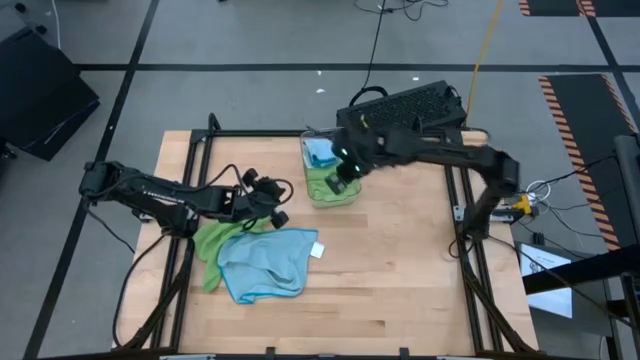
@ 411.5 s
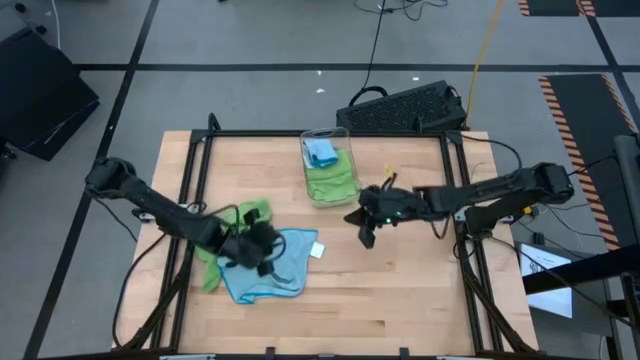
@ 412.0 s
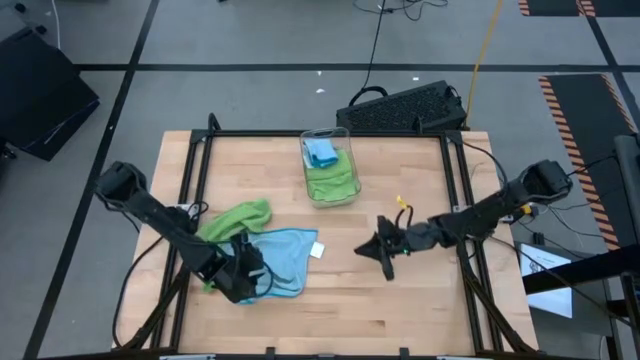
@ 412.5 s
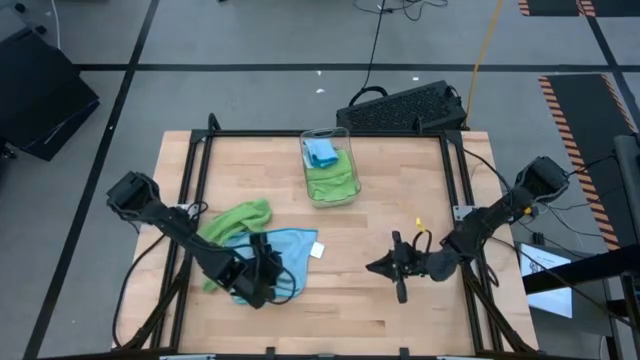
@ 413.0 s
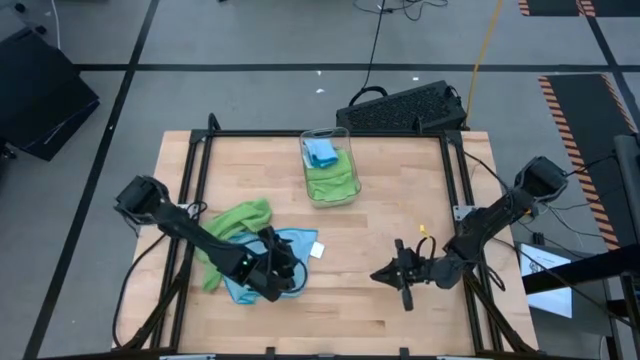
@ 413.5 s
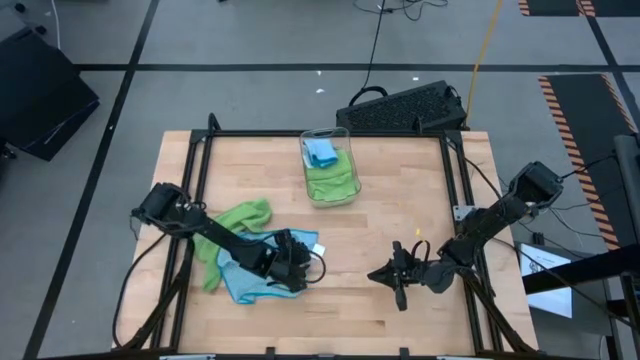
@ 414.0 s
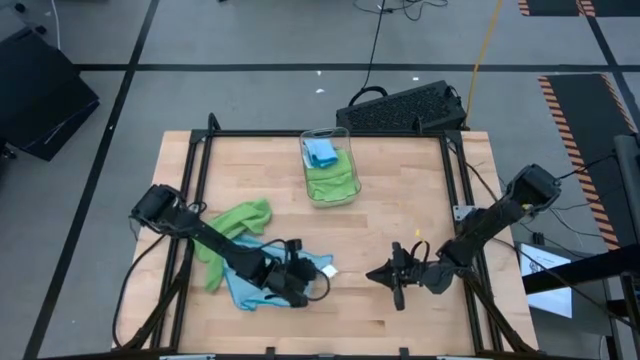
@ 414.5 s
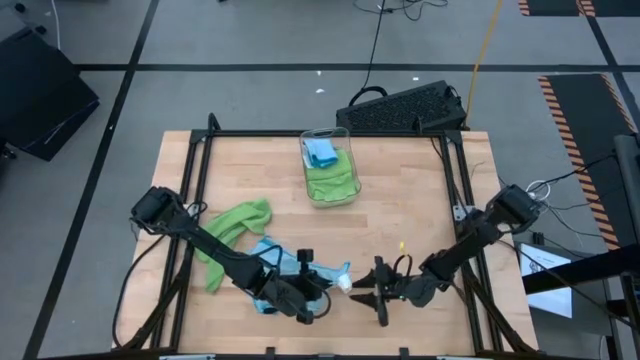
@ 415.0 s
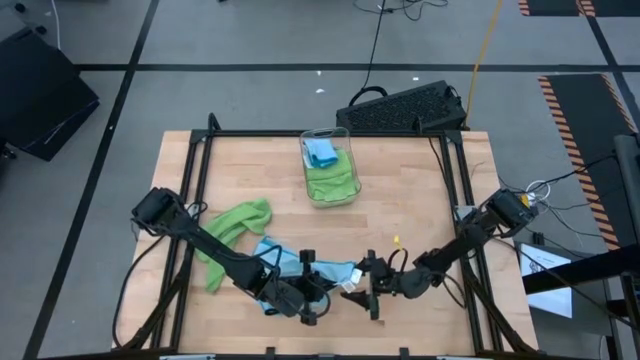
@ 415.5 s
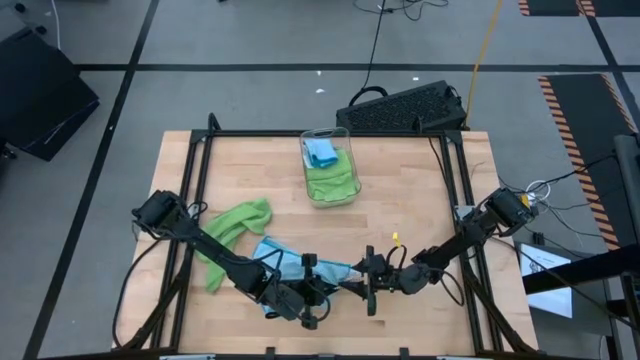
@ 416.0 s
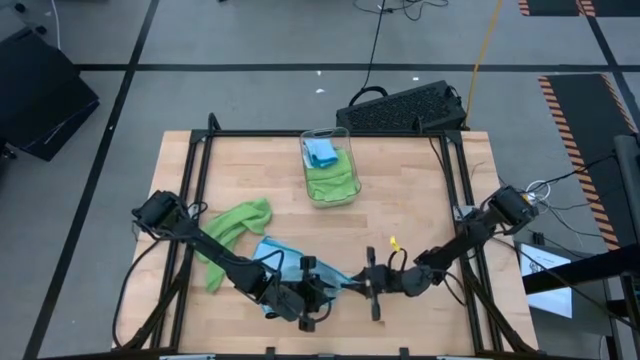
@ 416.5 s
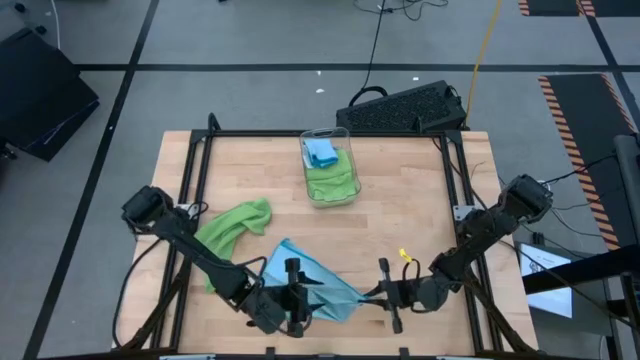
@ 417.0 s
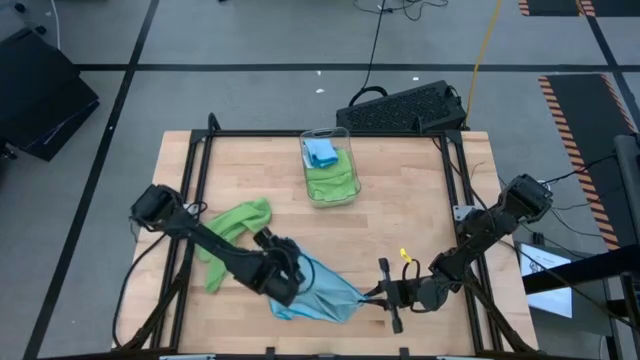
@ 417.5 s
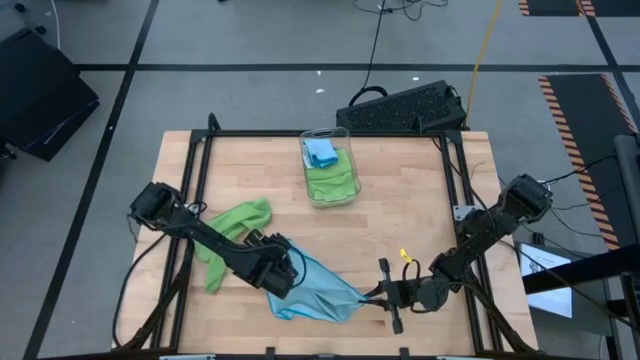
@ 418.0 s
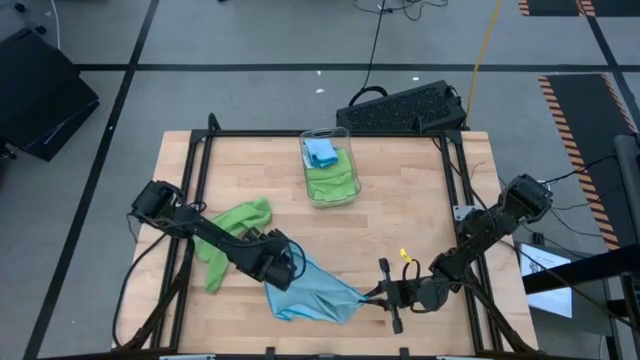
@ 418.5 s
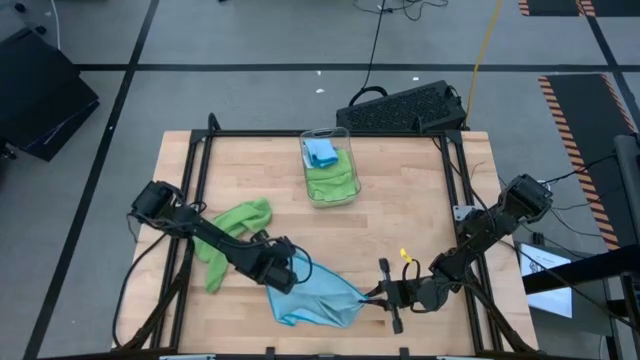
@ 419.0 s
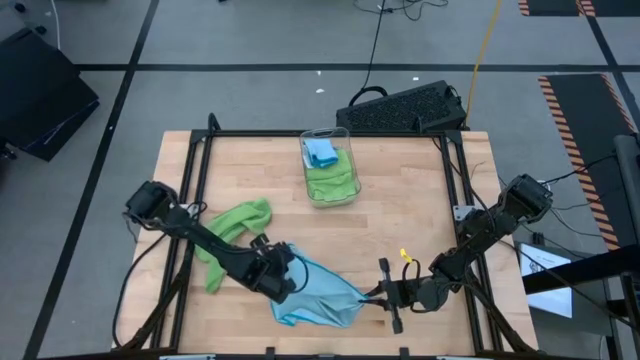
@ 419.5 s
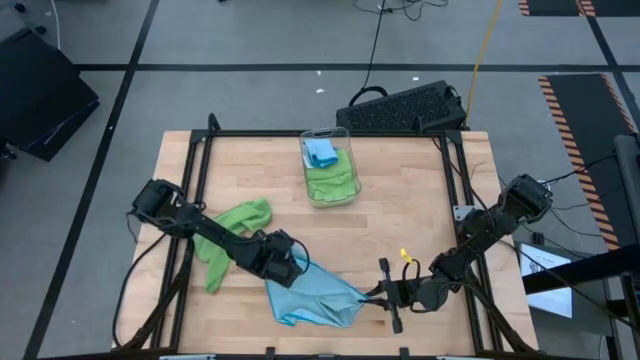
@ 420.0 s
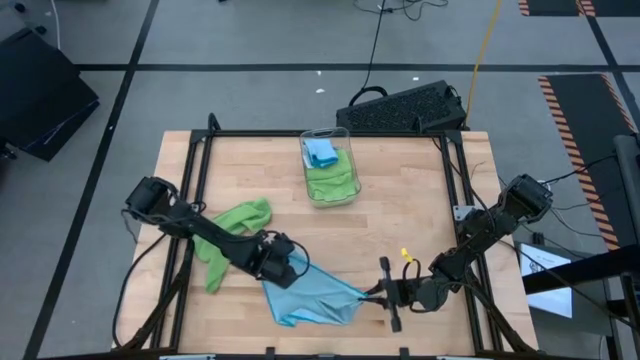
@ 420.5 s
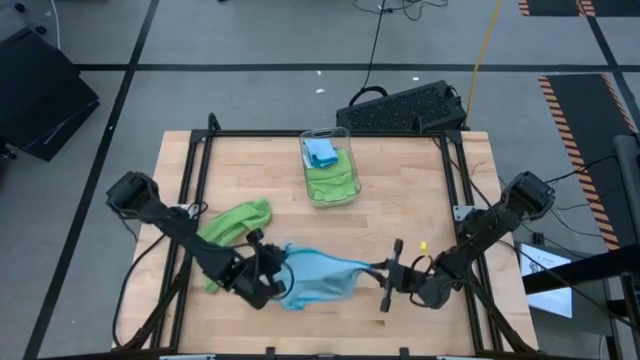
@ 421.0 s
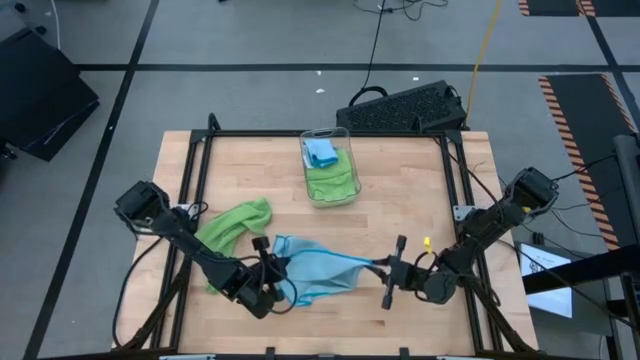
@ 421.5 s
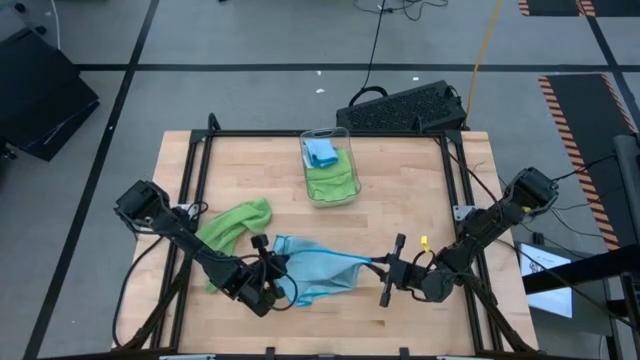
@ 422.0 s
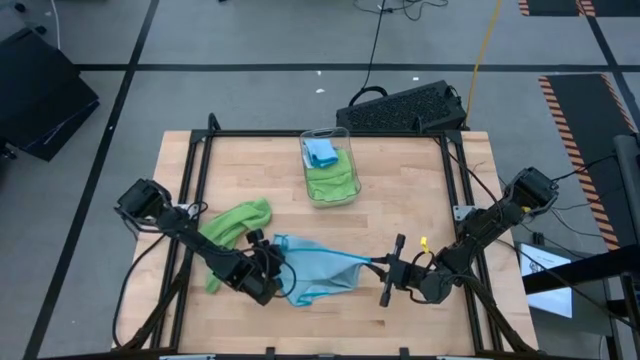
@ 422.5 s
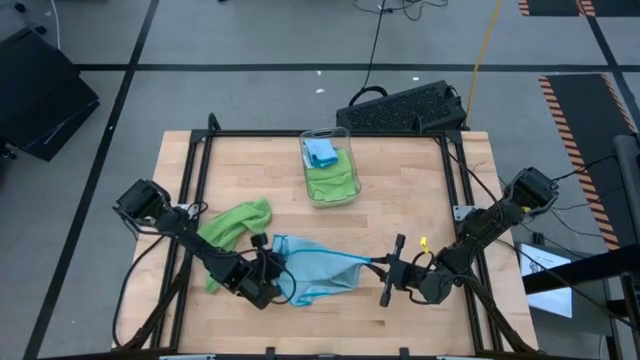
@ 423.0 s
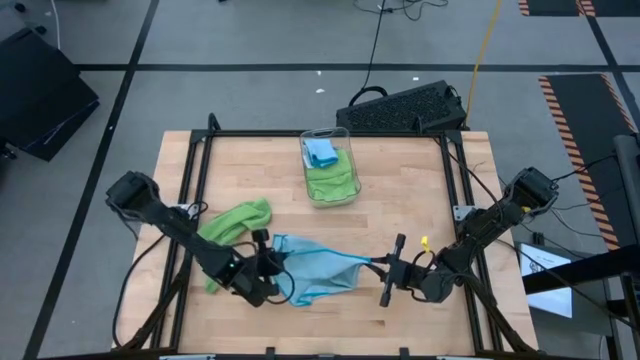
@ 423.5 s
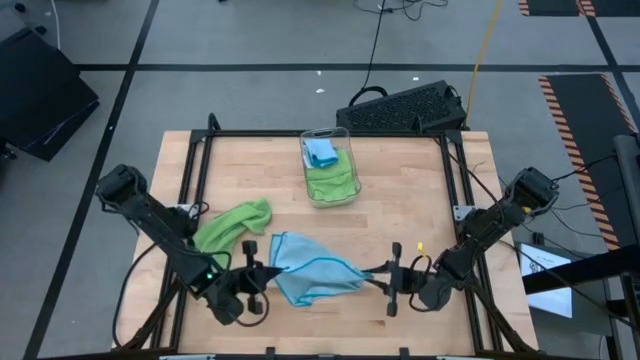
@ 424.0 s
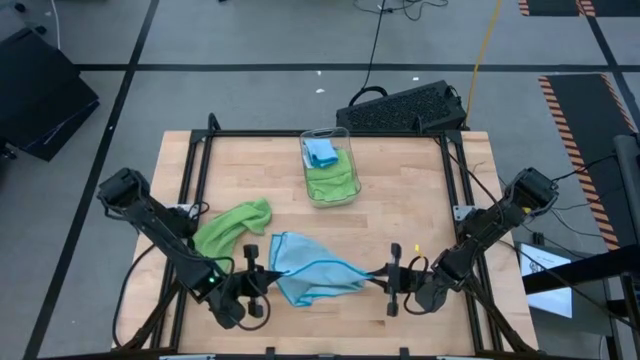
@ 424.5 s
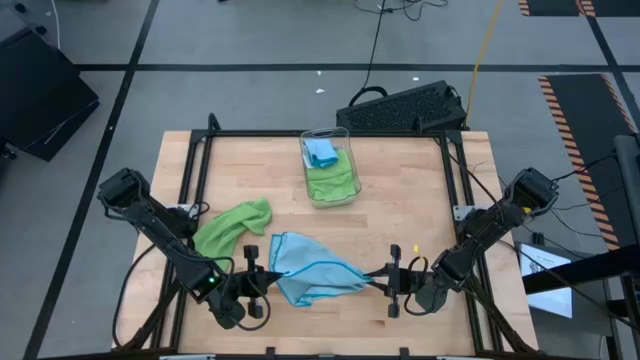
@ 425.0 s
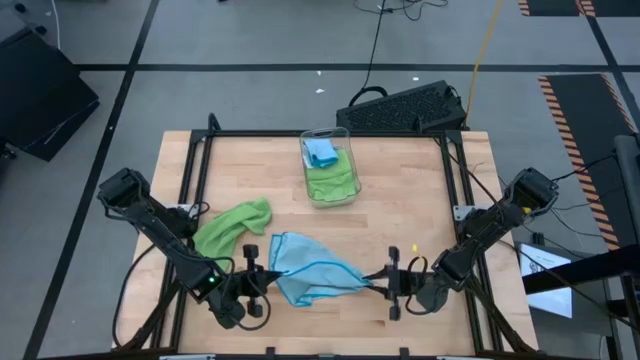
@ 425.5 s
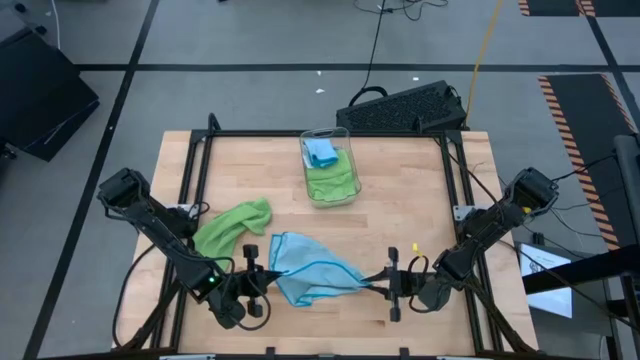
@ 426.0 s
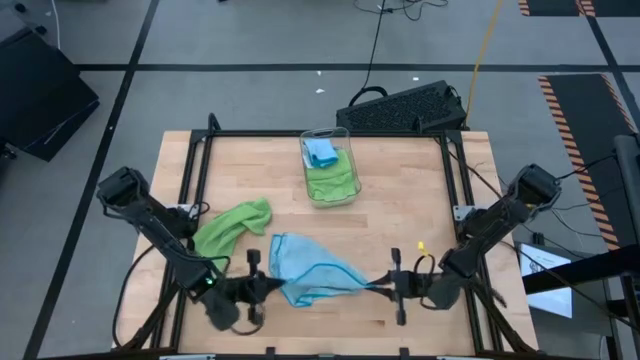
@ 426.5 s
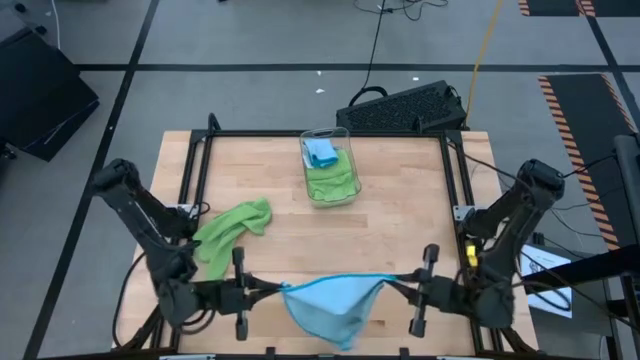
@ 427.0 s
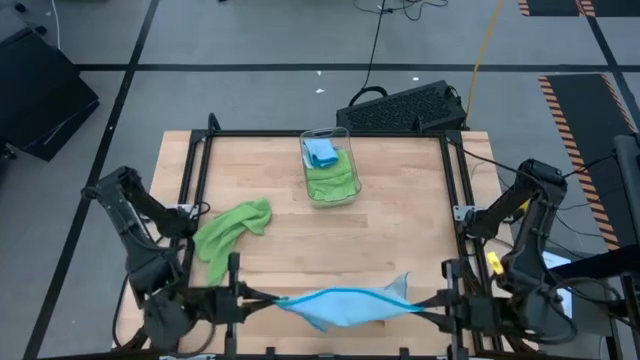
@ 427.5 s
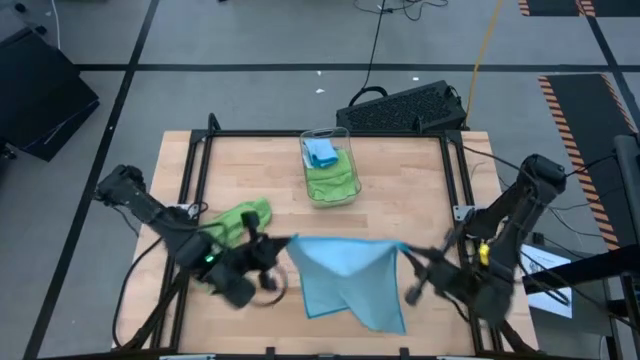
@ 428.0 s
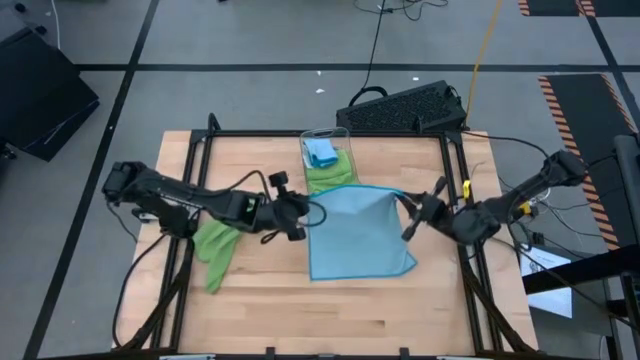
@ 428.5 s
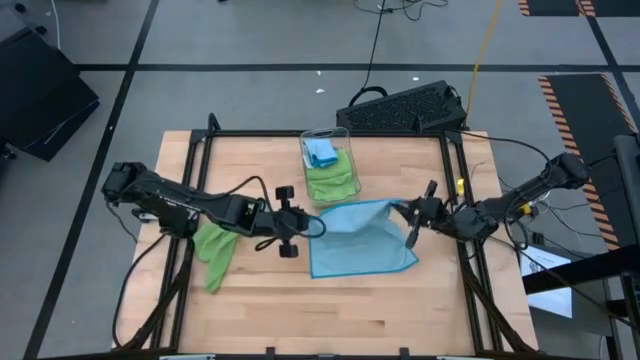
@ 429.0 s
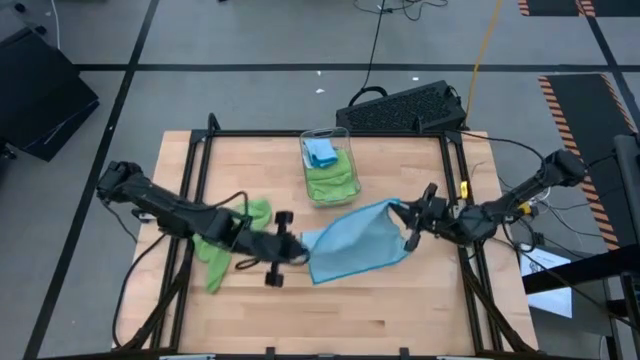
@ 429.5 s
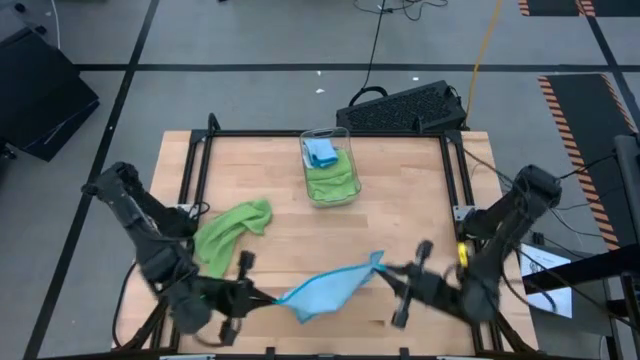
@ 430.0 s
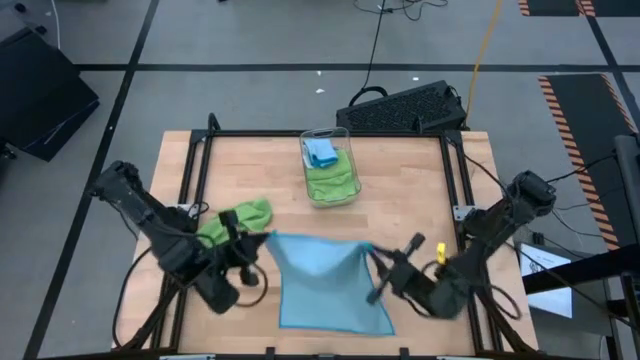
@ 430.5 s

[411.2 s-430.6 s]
Task: Fold microfiber towels
Fold the blue towel
